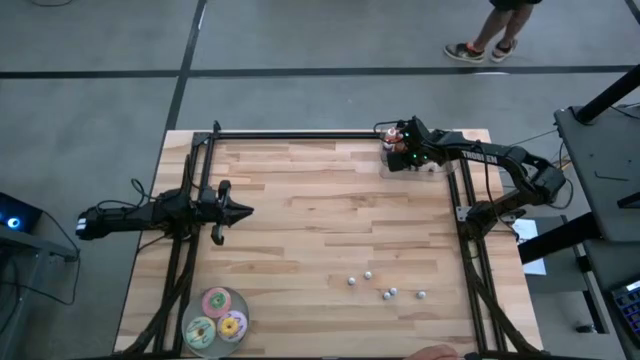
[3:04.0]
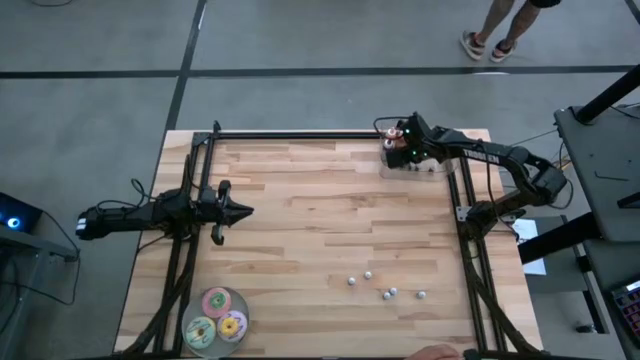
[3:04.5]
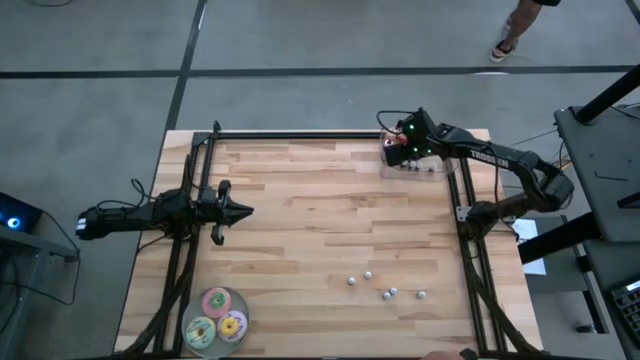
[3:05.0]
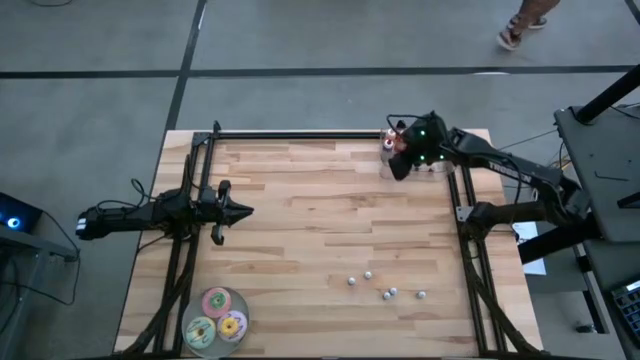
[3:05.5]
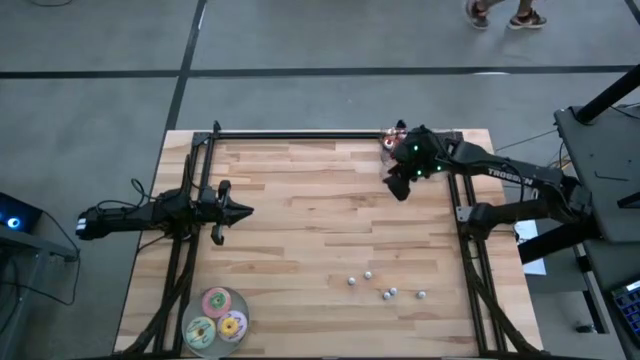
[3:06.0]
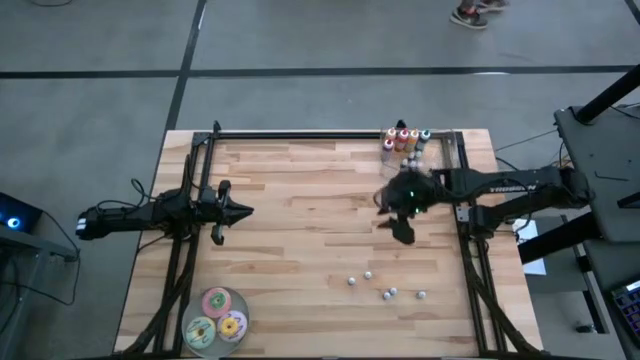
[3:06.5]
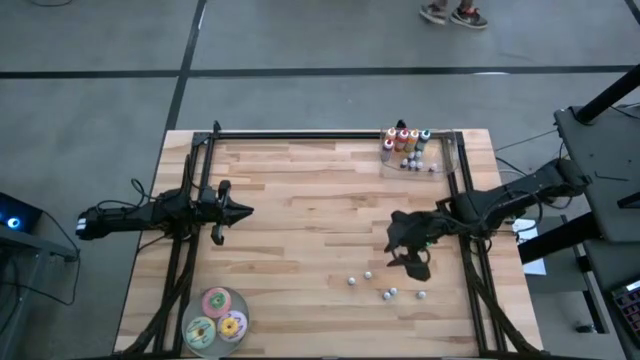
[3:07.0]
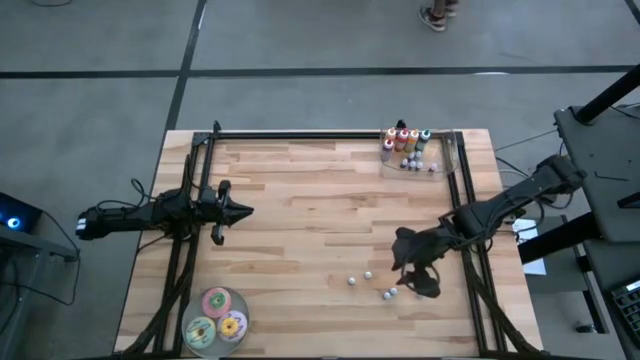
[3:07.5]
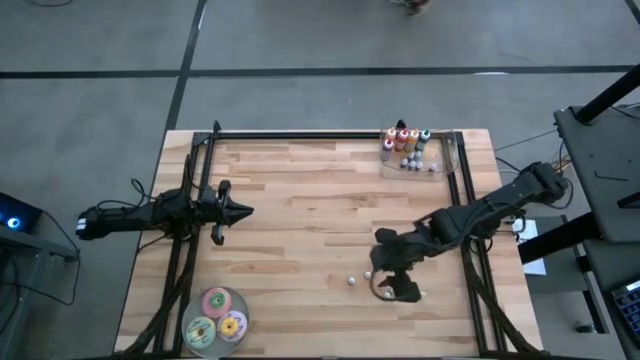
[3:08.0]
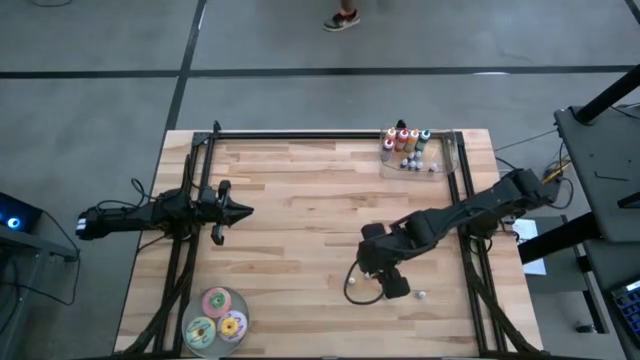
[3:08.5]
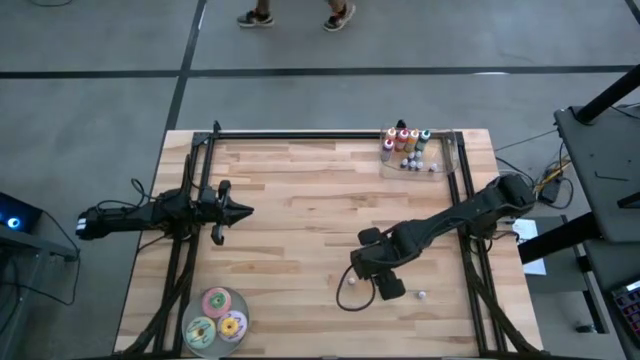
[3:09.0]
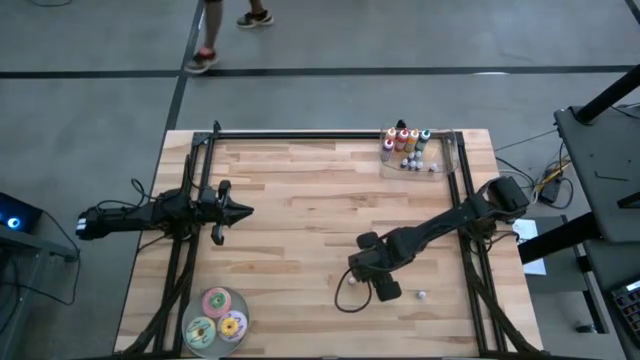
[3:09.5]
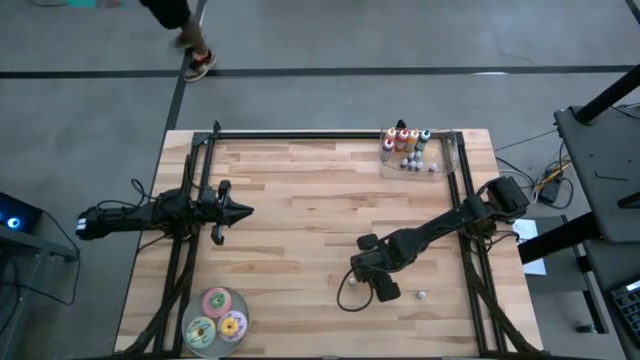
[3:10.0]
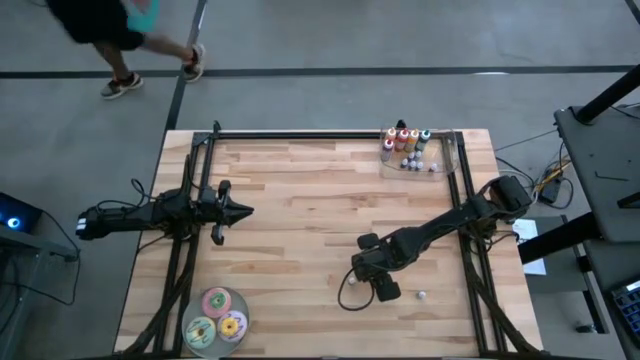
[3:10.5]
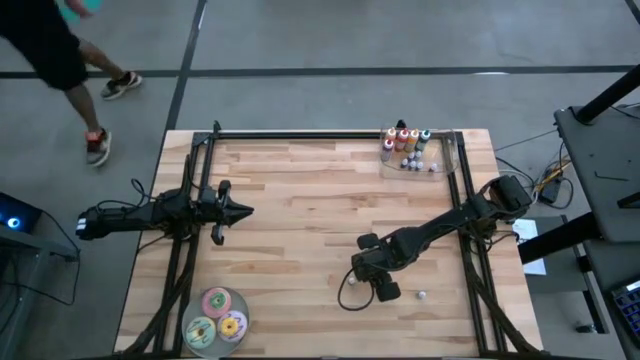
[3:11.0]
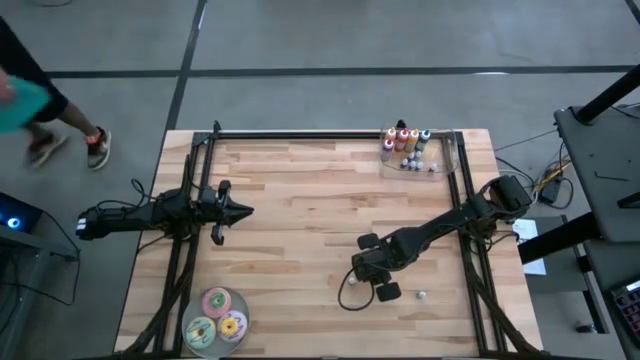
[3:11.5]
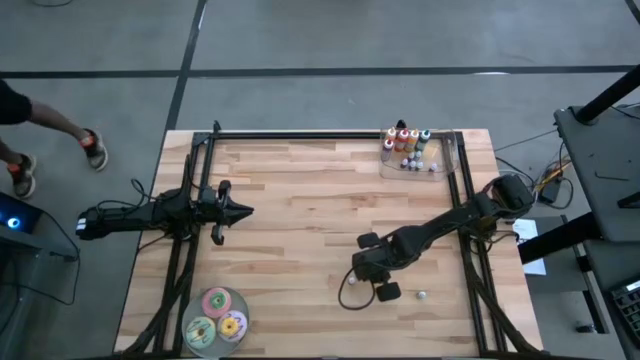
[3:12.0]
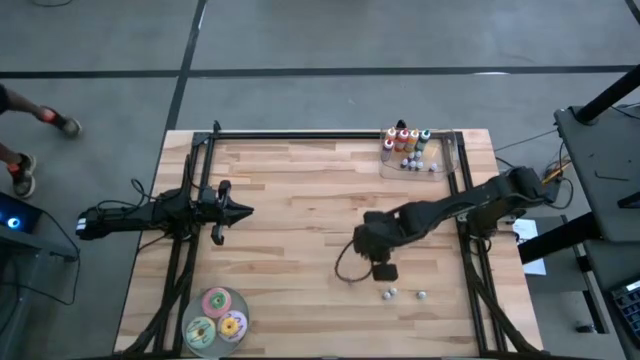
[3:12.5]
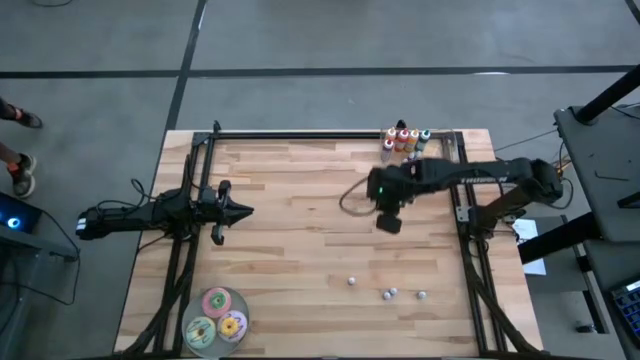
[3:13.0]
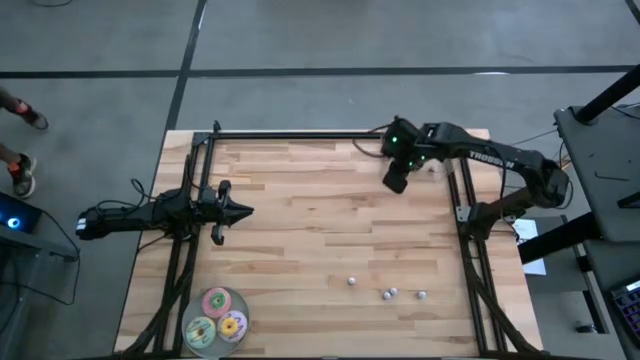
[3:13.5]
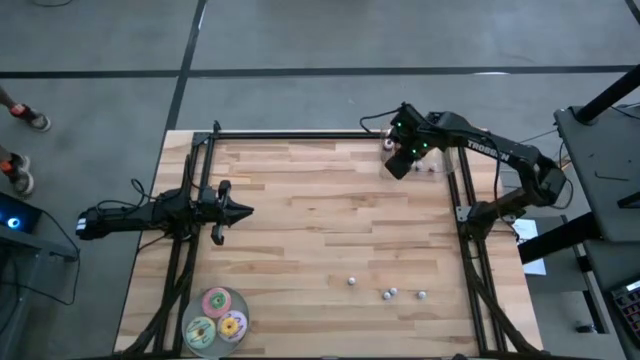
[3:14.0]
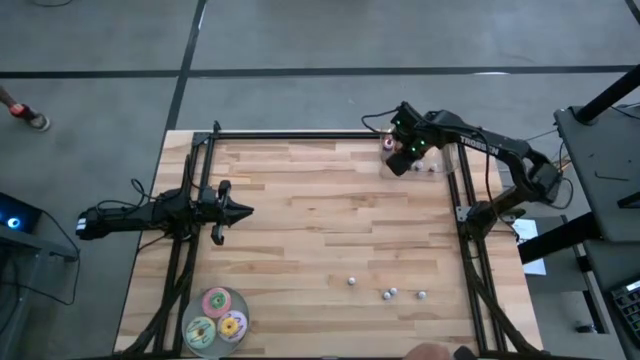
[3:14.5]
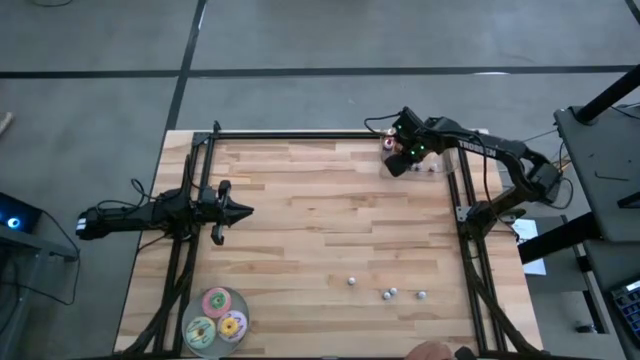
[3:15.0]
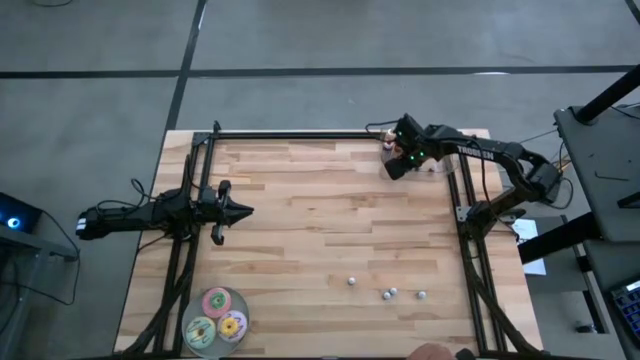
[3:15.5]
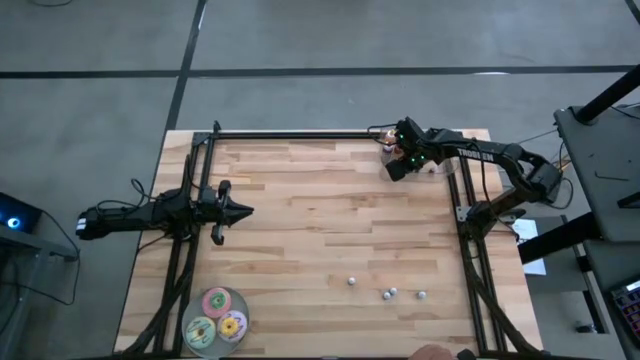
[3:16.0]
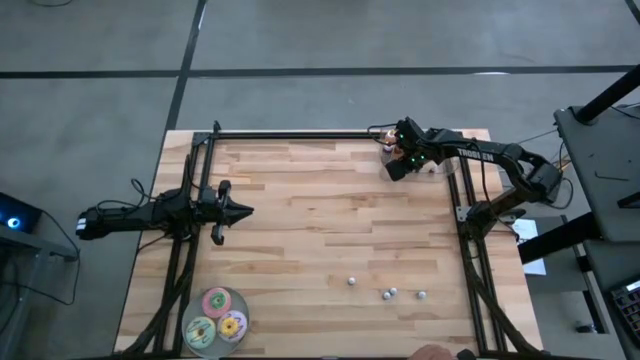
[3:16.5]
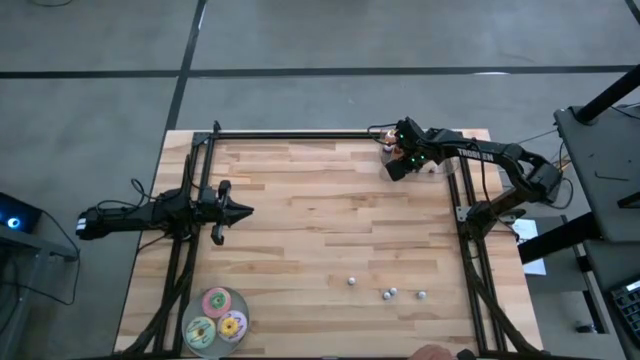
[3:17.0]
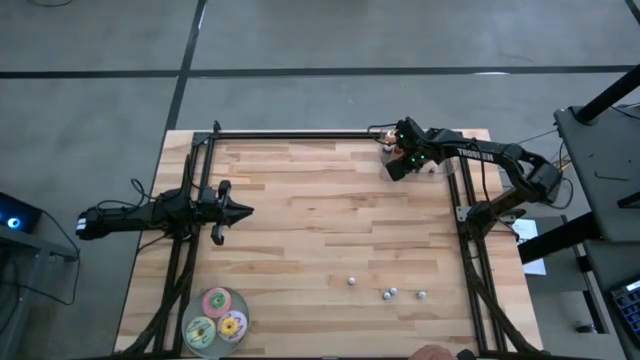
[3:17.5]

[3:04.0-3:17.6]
Task: Pick & Place food coloring
Put the small orange food coloring bottle into the bin

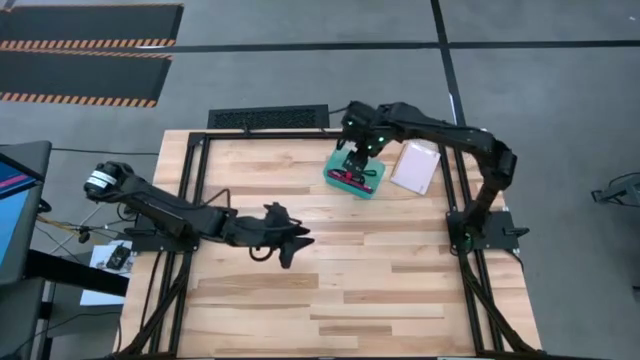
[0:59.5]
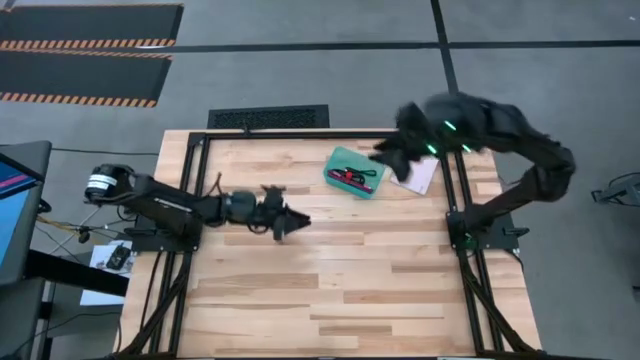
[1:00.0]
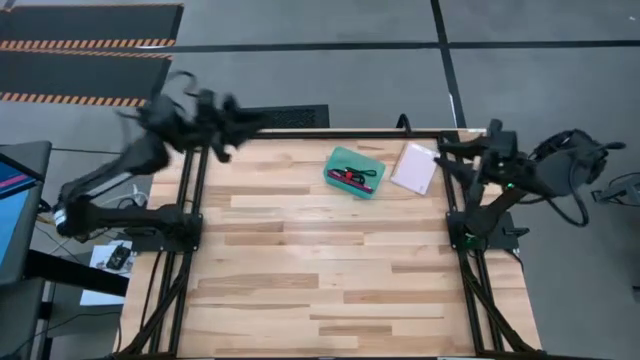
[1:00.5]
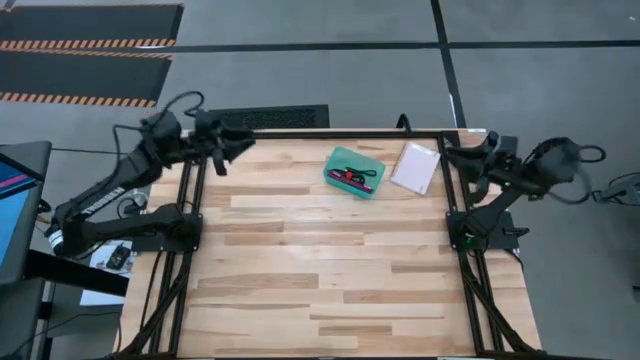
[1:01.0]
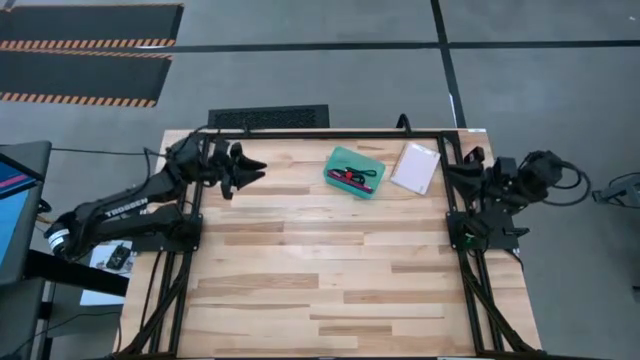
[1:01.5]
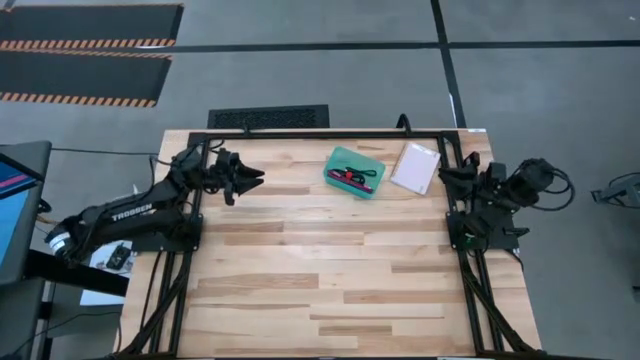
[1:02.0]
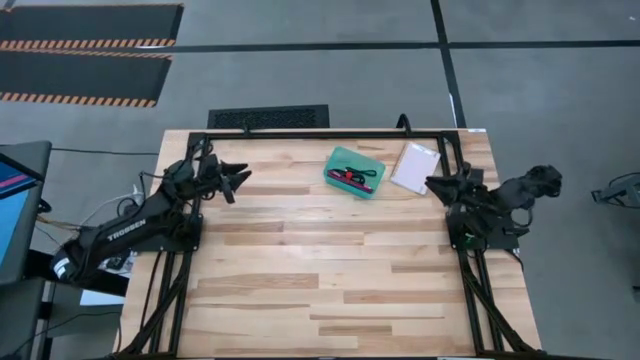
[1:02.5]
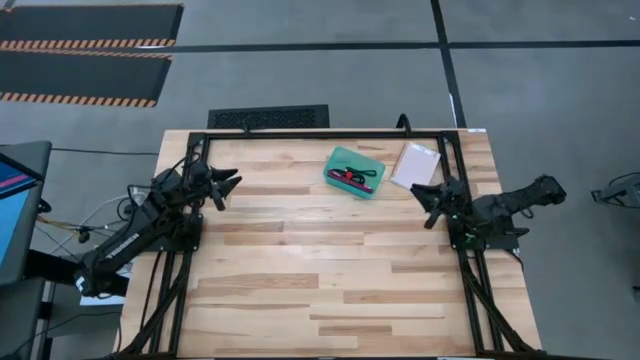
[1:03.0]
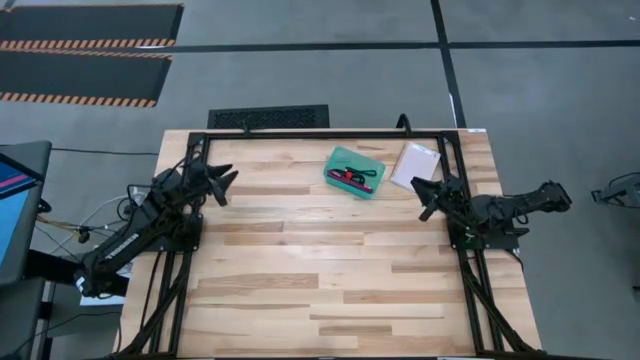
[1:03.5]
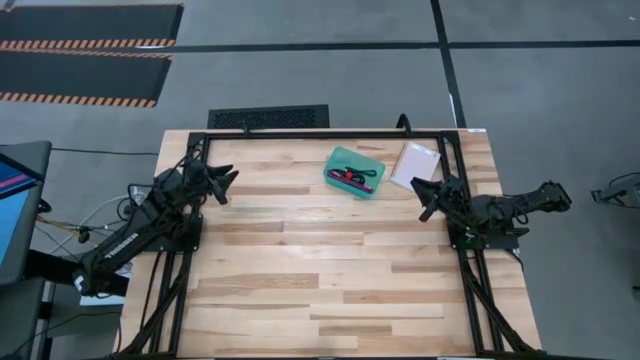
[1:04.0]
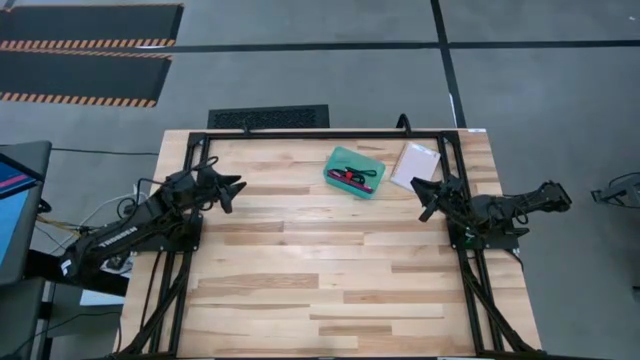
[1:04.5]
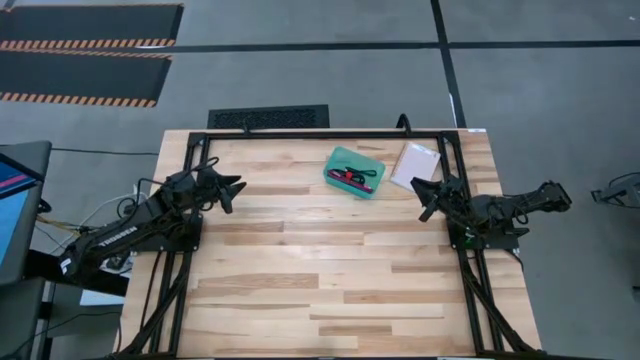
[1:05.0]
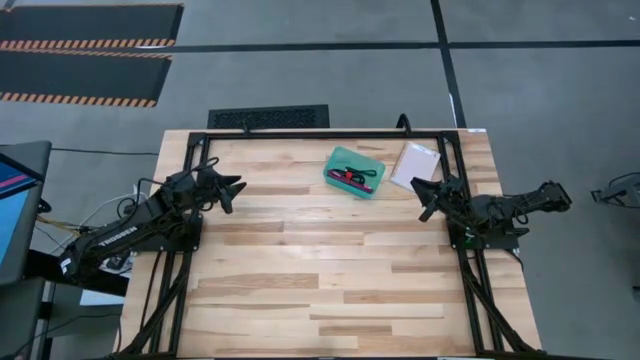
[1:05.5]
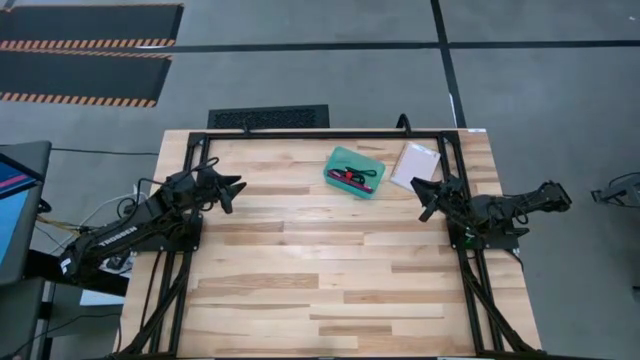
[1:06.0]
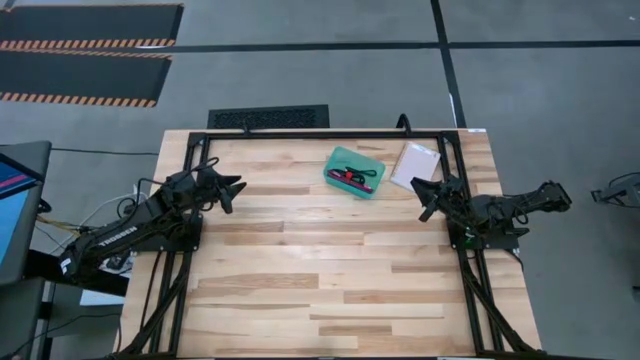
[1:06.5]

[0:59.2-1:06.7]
Task: Pick and place USB-C Cables
Return to home position
